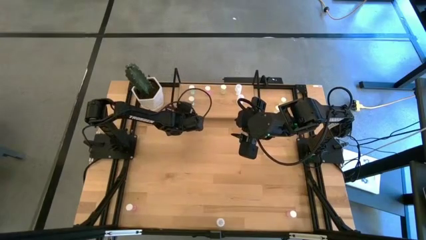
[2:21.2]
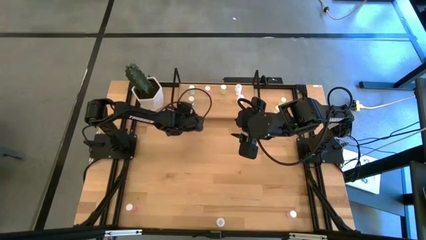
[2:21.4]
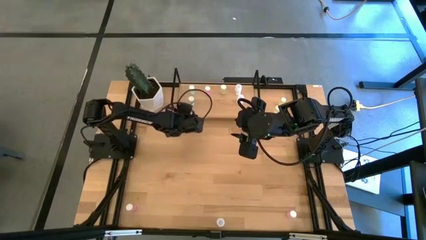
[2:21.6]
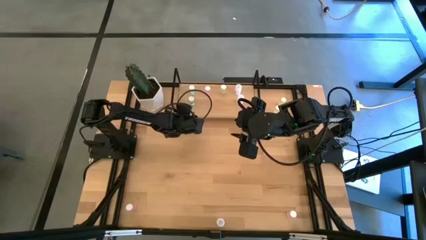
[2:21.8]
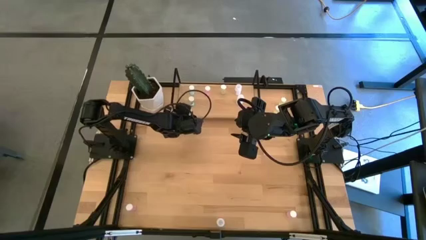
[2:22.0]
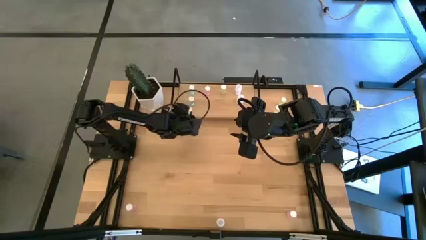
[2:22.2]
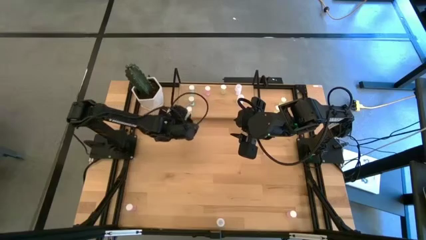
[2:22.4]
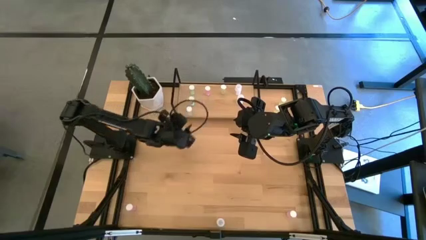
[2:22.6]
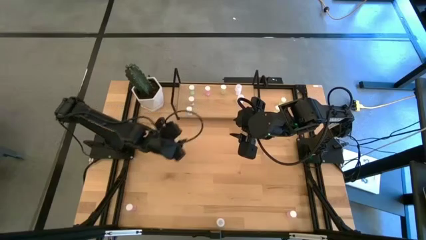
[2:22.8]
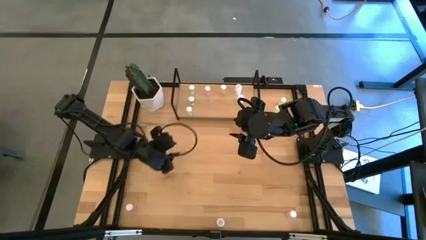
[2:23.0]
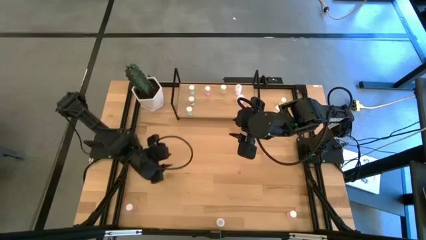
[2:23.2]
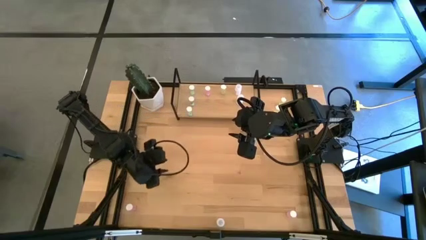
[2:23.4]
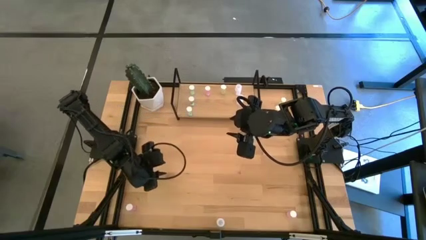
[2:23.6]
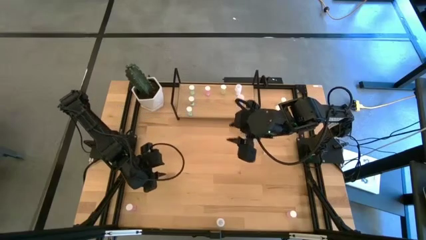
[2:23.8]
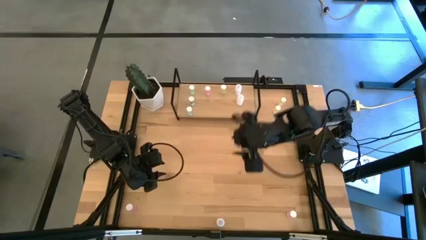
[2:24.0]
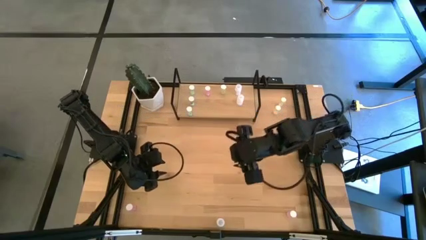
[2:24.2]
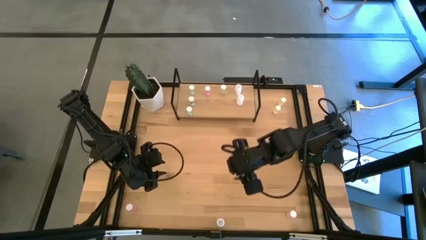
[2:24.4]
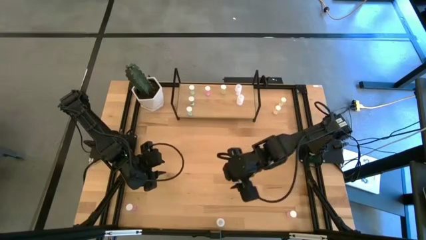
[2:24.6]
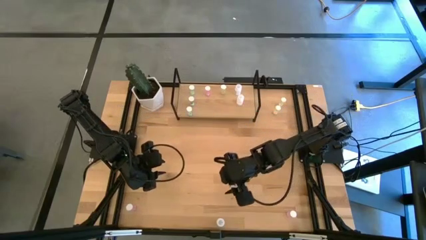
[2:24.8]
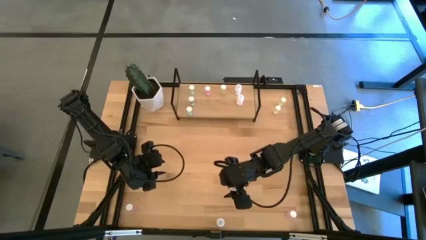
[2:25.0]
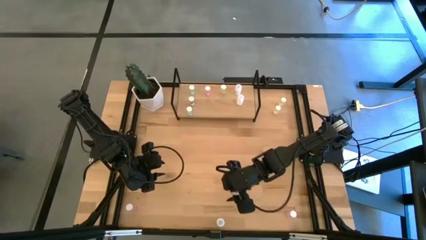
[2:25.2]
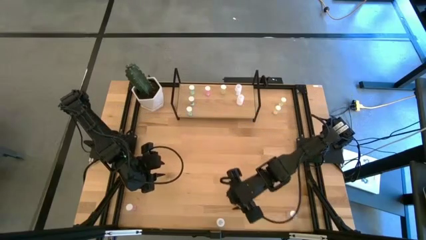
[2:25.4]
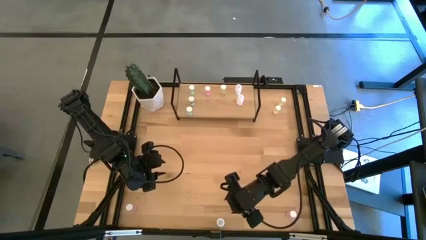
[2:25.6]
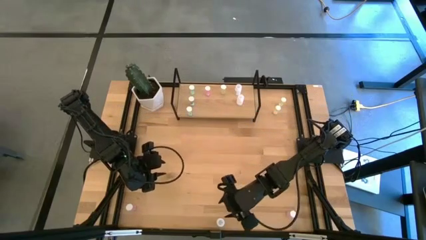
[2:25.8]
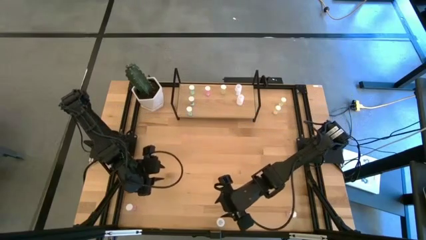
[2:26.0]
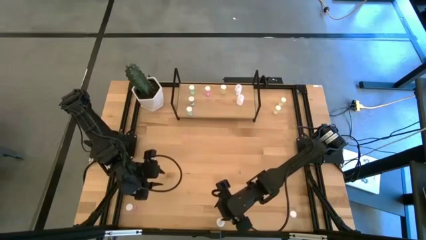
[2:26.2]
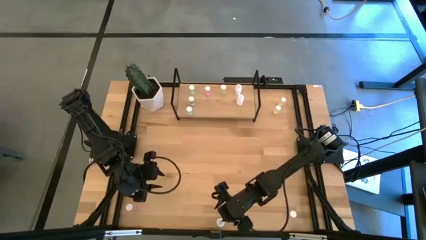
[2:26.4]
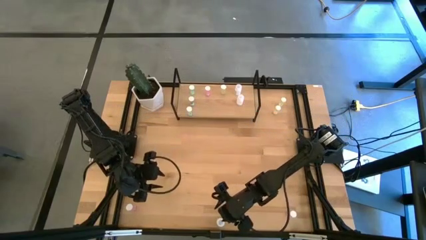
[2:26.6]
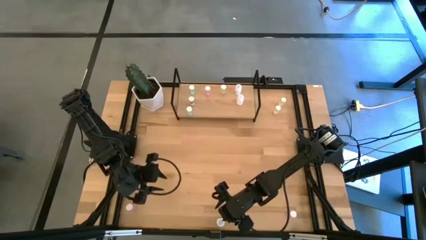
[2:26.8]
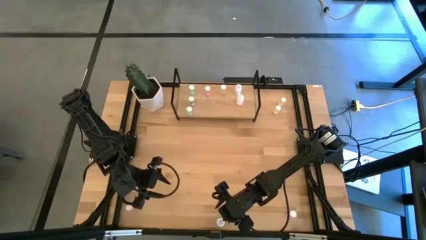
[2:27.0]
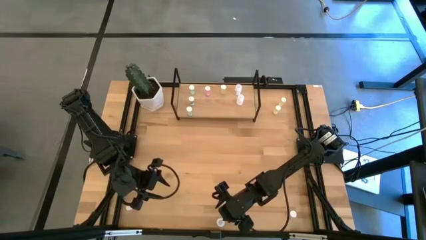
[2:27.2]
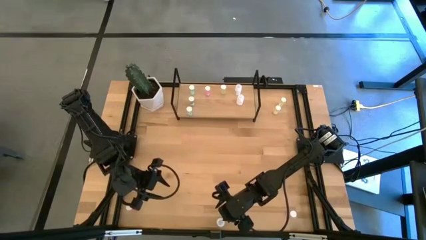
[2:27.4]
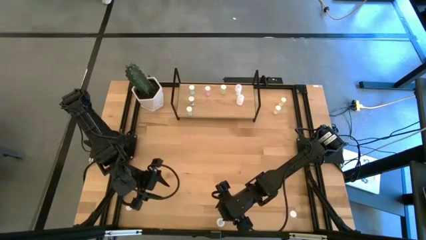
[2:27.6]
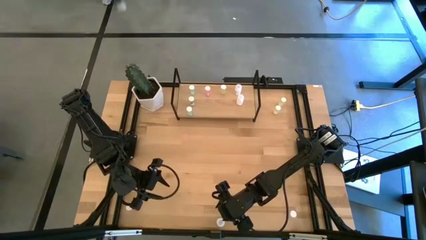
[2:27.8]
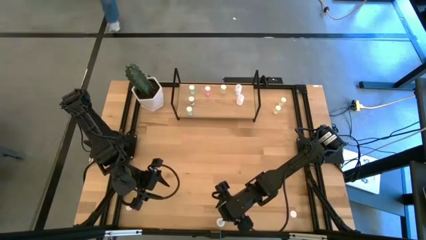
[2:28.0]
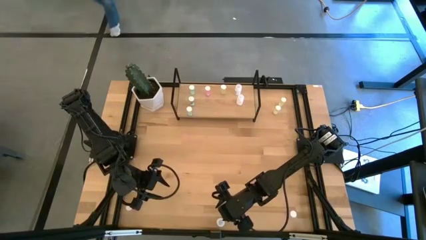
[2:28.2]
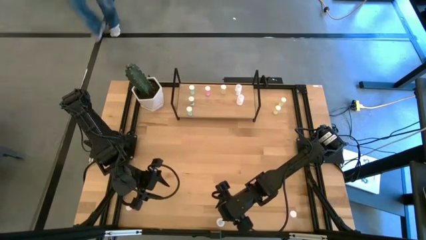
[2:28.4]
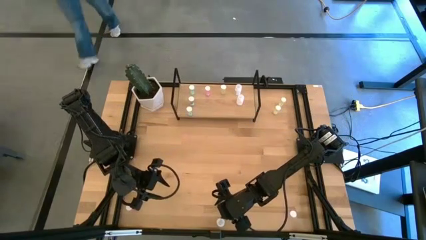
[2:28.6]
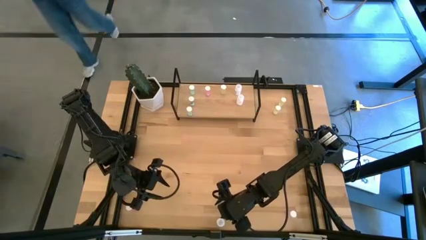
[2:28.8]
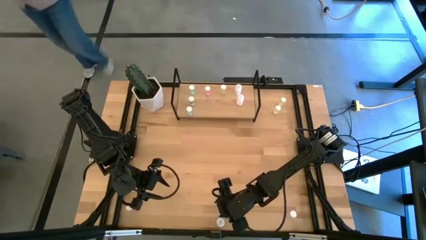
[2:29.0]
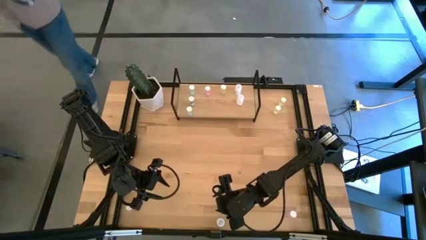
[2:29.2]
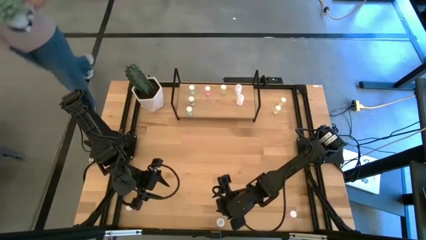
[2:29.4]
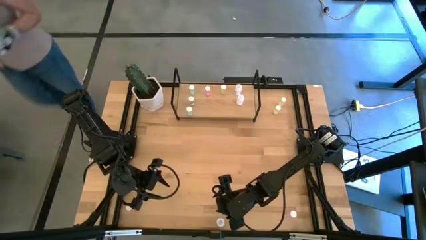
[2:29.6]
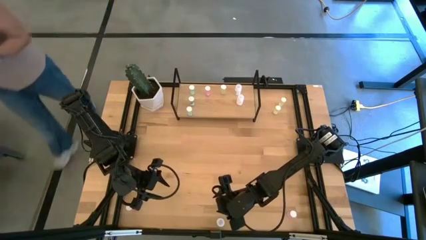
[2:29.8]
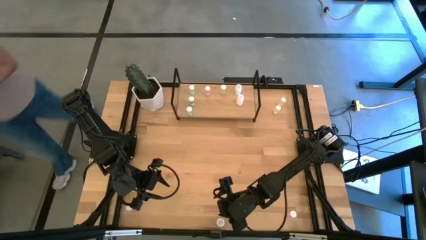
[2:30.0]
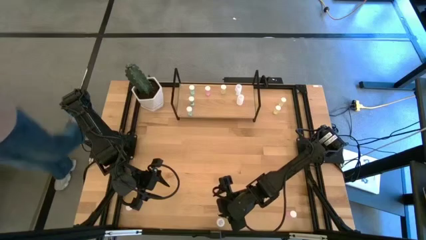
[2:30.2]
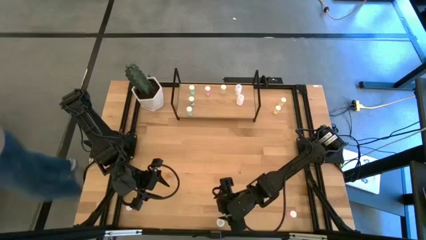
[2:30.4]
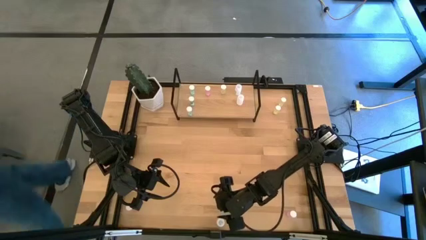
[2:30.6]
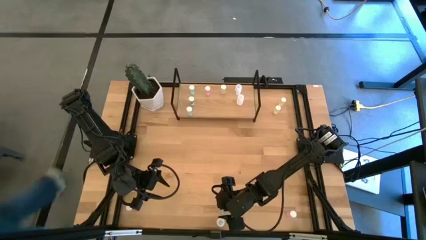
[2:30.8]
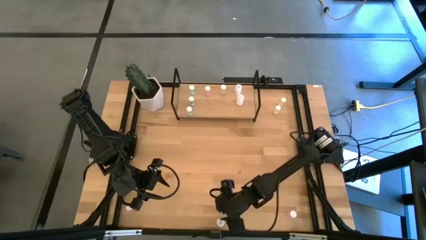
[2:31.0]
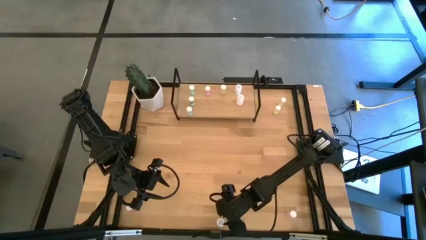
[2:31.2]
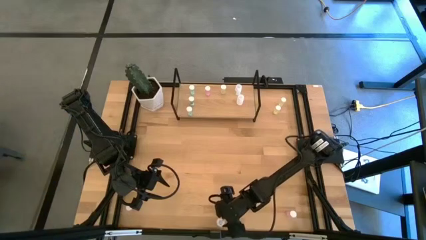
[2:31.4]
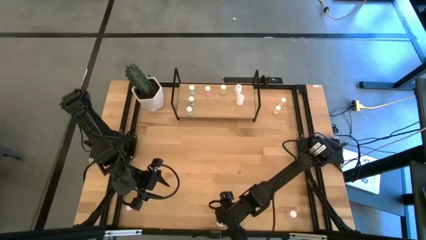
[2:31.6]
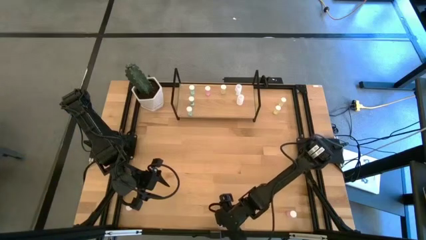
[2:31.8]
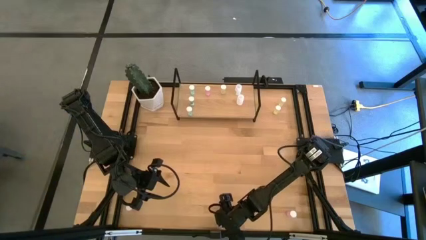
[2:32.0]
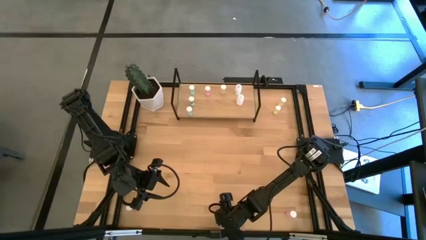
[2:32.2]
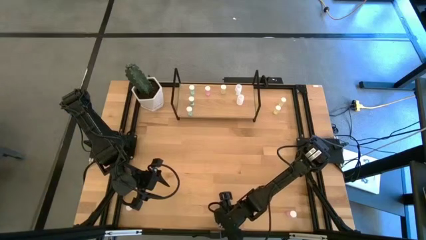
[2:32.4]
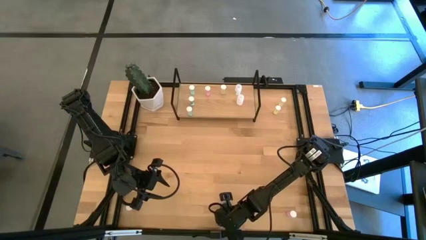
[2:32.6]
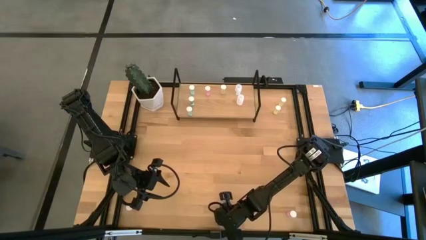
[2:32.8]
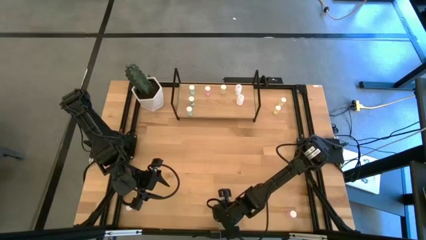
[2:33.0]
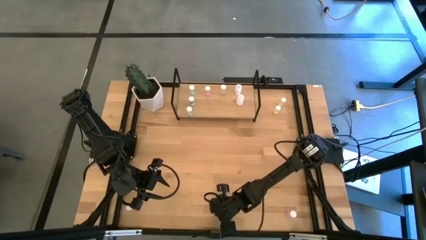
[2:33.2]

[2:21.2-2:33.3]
Task: Pick and place medicine bottles onto shelf by color
Put the white pill bottle on the shelf aligned with the other white pill bottle

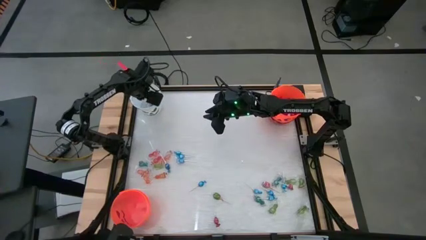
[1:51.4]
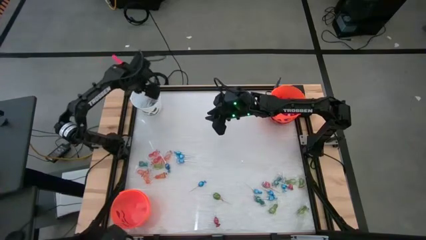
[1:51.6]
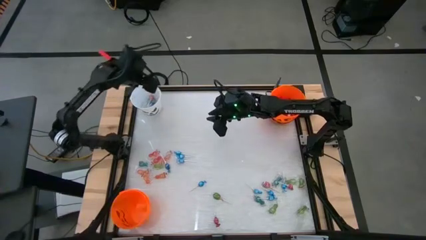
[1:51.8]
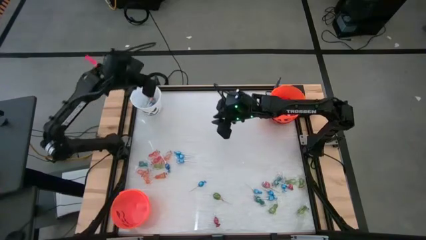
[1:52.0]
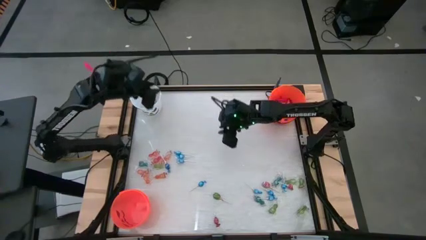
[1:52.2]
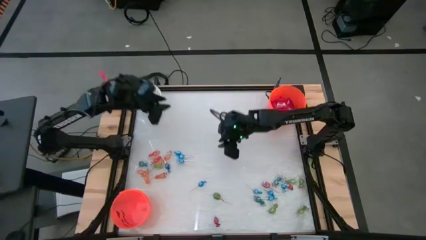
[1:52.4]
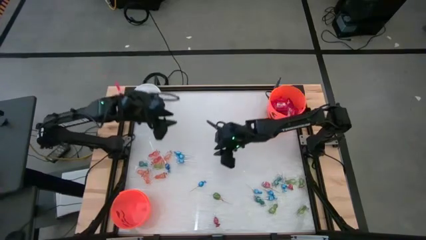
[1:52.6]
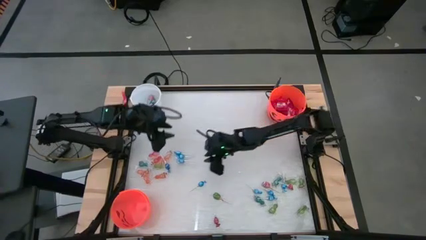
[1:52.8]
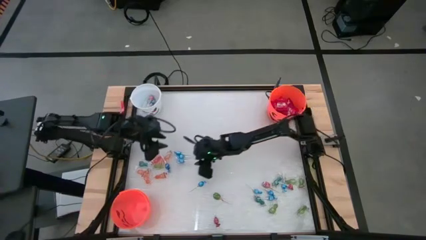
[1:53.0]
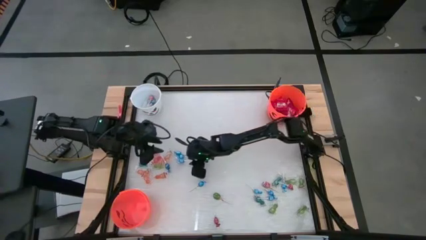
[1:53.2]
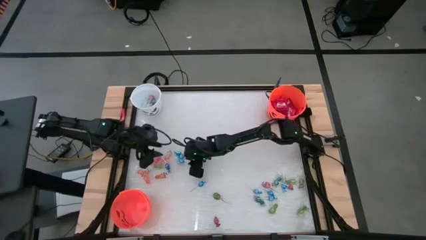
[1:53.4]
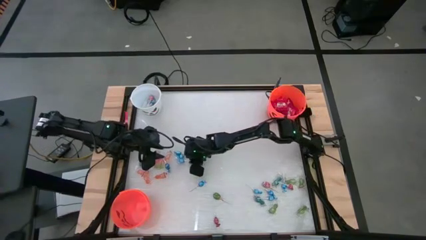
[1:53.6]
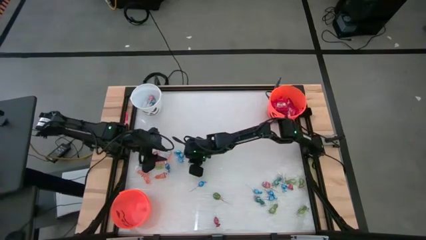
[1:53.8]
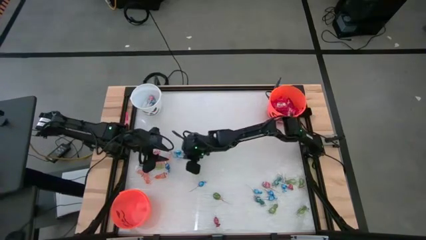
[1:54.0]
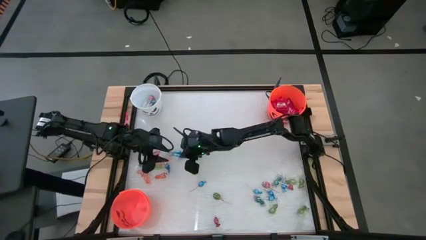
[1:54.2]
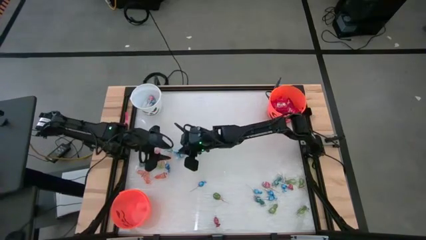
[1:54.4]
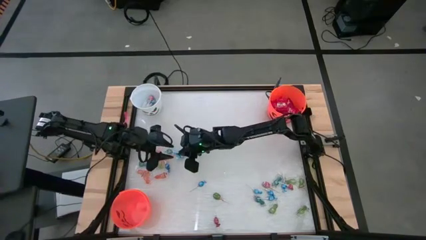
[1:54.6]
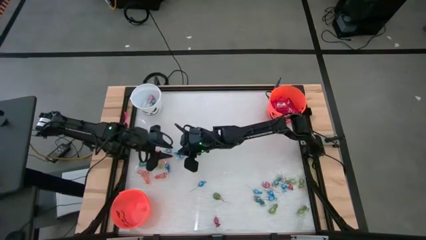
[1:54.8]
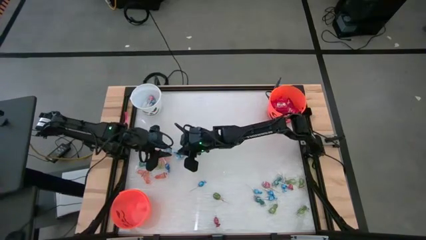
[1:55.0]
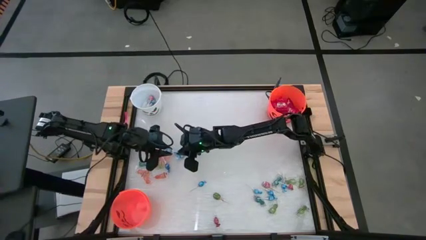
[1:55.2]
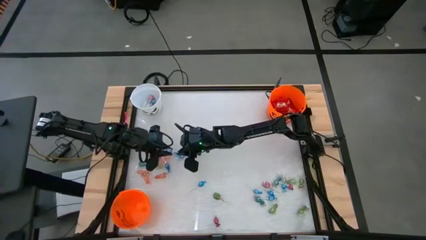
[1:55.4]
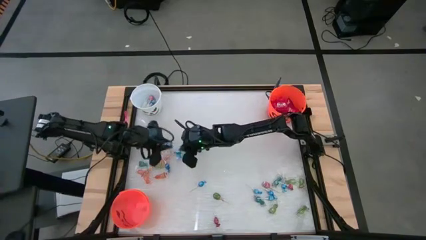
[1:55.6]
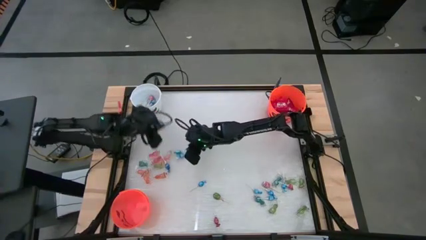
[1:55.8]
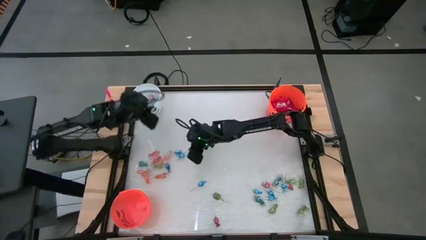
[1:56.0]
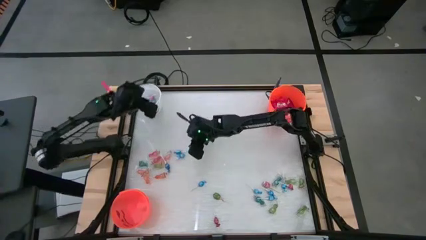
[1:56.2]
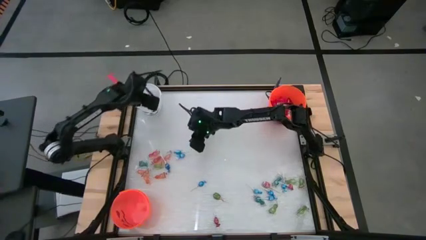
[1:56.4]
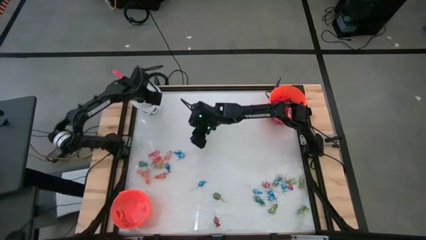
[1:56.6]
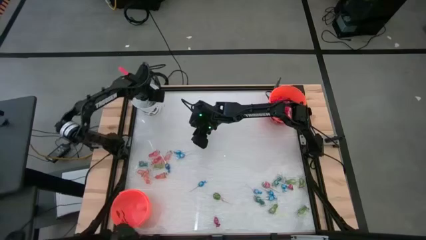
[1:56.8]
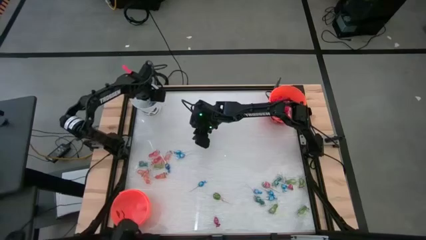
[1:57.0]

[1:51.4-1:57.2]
Task: Sort candy by brand, put in halloween buckets
Put the blue lollipop into the white bucket
